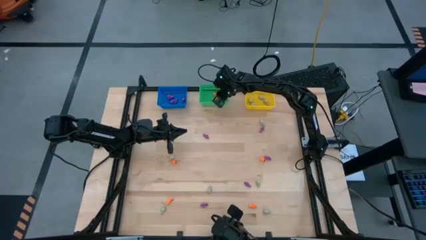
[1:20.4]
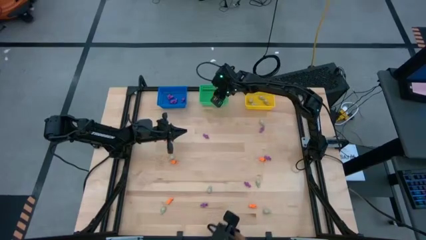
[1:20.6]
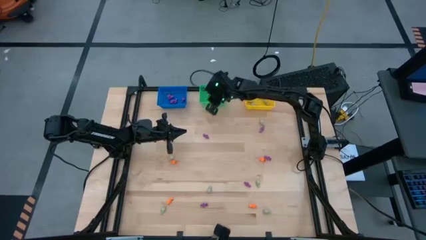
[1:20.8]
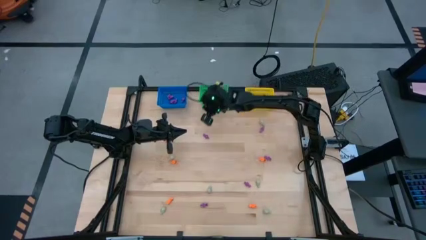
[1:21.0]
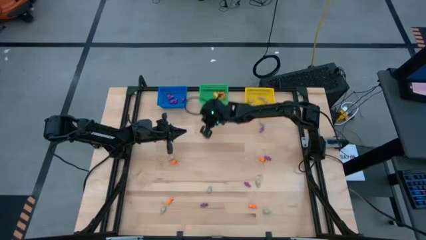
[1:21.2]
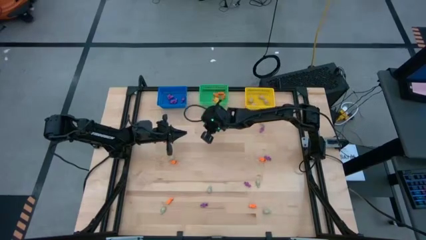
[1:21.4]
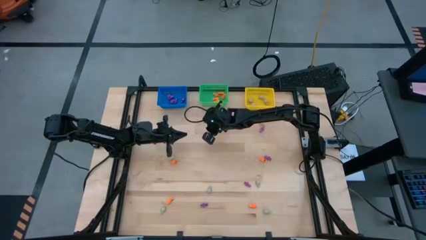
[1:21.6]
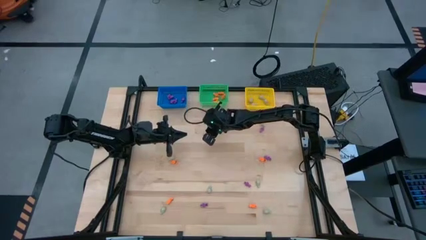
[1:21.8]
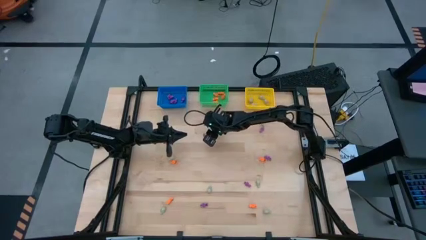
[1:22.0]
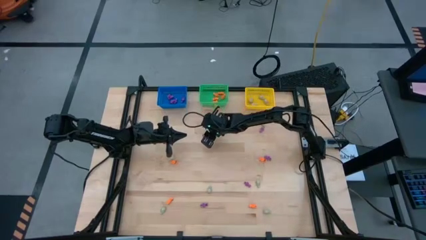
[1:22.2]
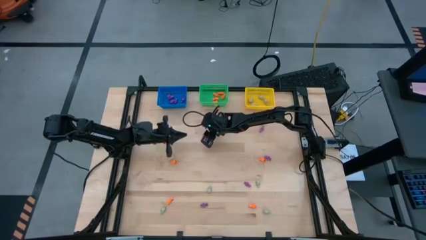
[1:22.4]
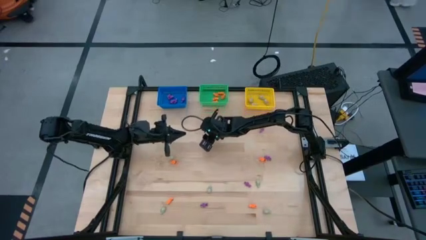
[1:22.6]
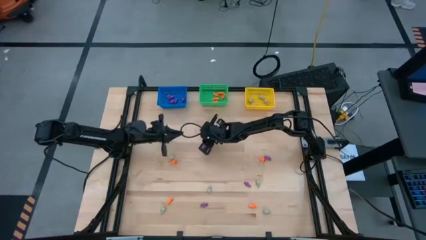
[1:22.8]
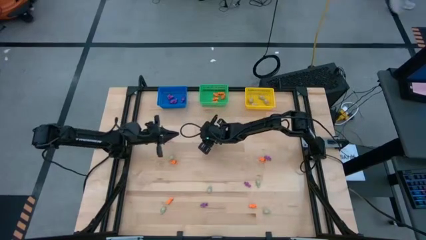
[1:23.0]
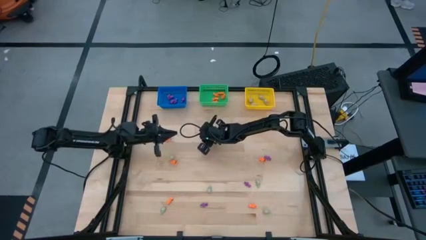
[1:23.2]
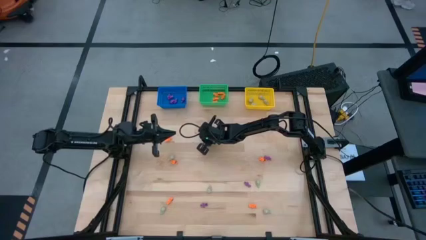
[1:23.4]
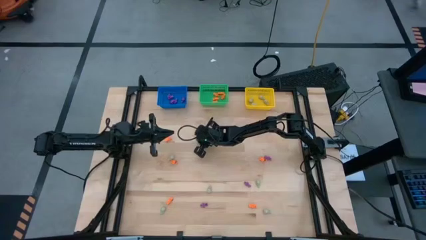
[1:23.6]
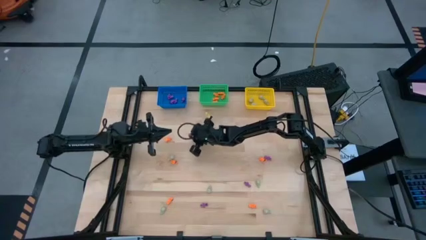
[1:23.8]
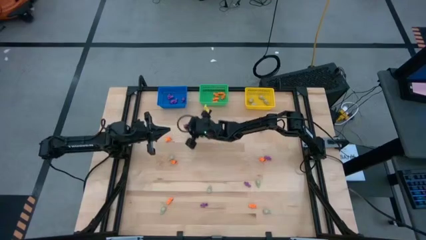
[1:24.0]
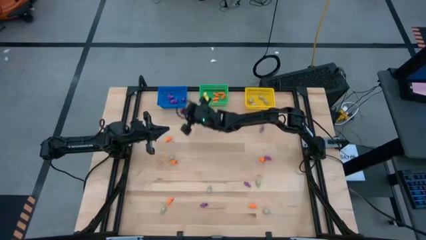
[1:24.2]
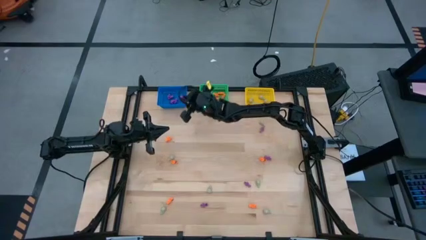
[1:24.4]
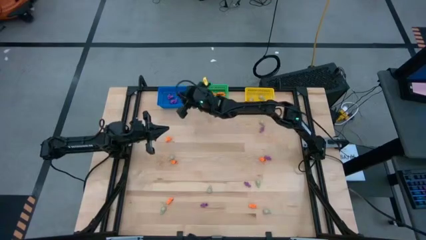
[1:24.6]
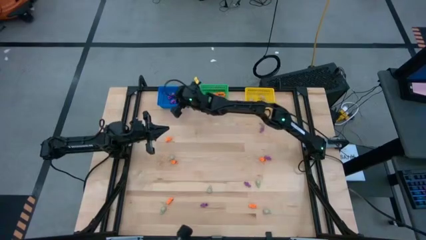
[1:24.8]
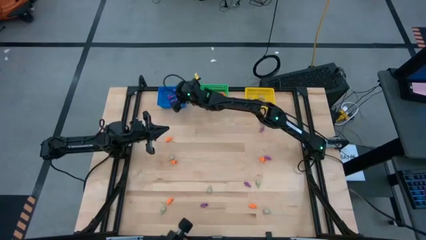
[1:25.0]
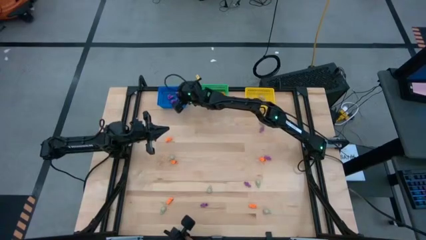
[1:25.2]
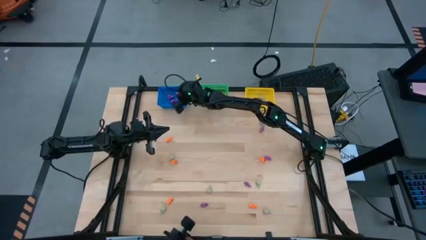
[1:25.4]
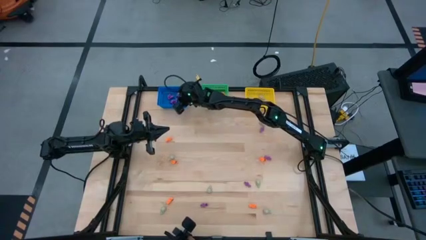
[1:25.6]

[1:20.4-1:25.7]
Task: Sort Halloween decoration
Put the purple skeleton toy into the blue basket

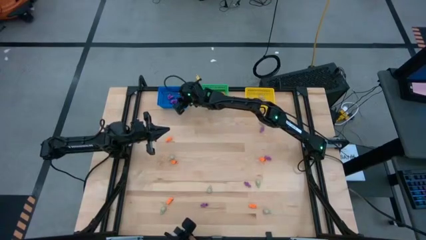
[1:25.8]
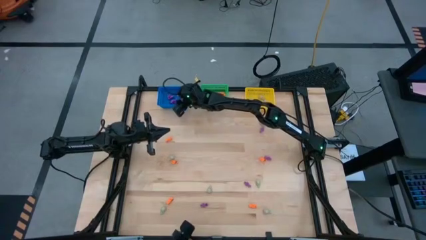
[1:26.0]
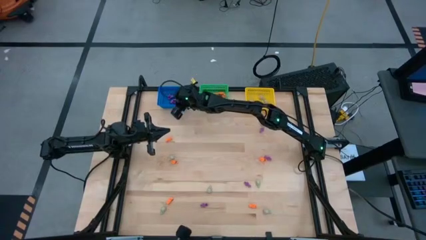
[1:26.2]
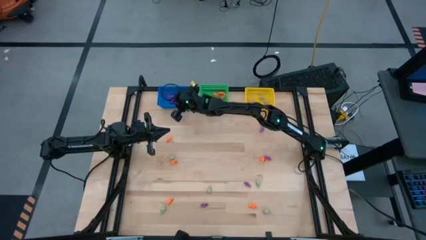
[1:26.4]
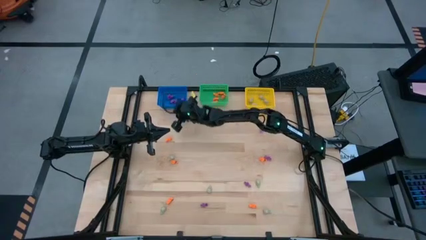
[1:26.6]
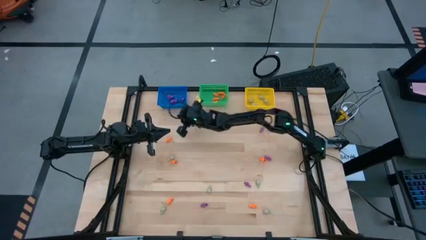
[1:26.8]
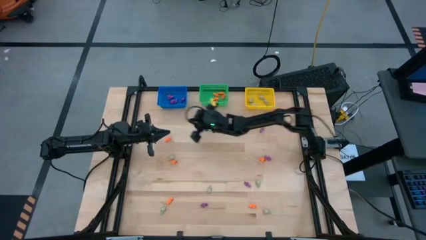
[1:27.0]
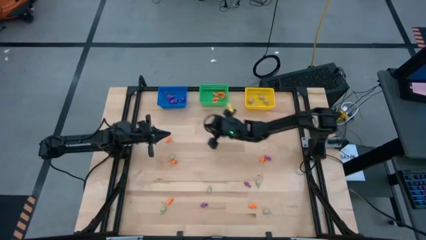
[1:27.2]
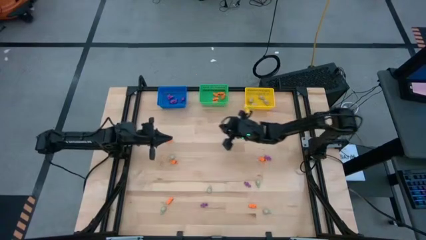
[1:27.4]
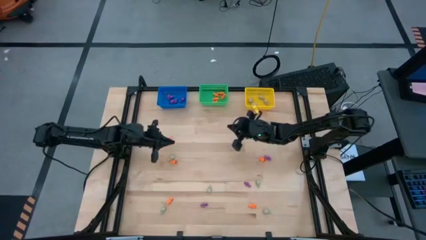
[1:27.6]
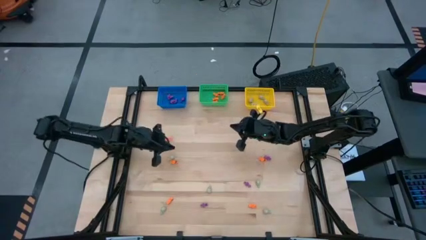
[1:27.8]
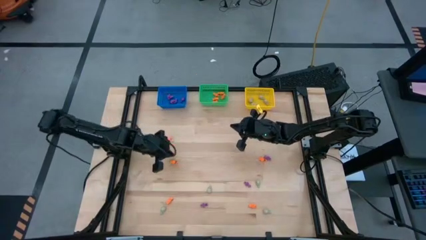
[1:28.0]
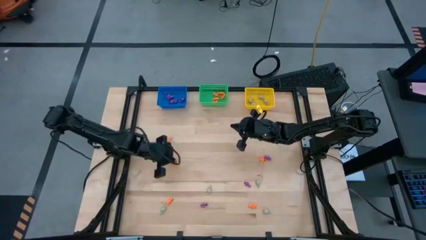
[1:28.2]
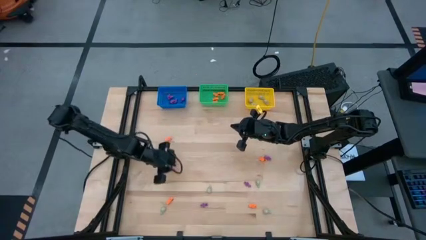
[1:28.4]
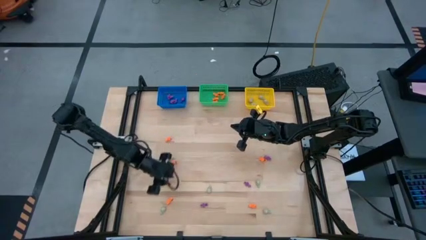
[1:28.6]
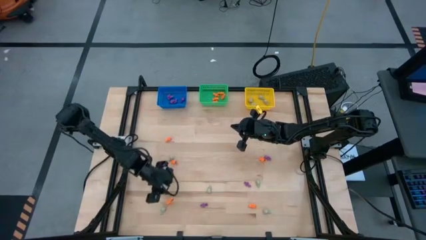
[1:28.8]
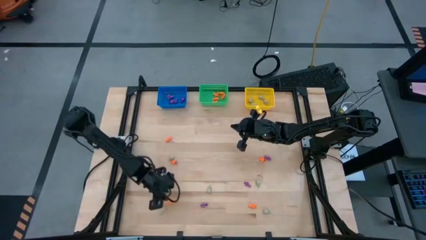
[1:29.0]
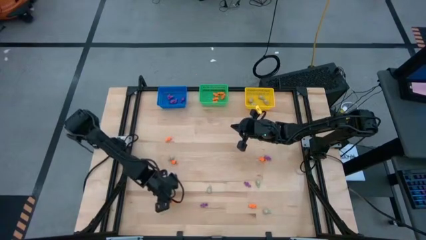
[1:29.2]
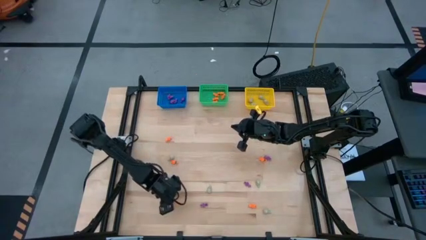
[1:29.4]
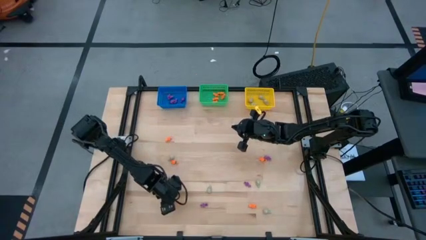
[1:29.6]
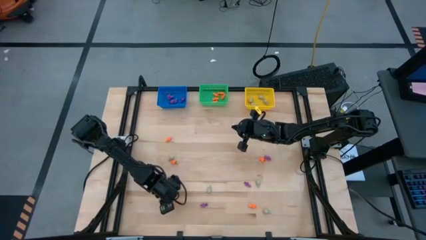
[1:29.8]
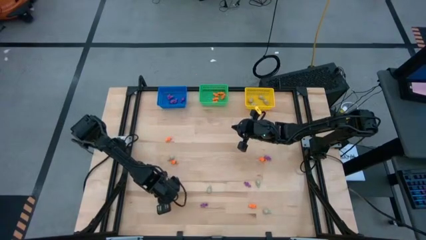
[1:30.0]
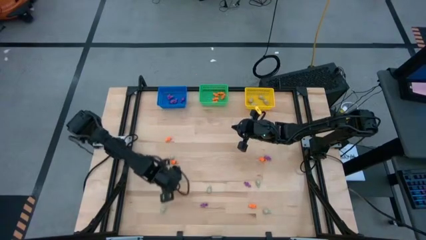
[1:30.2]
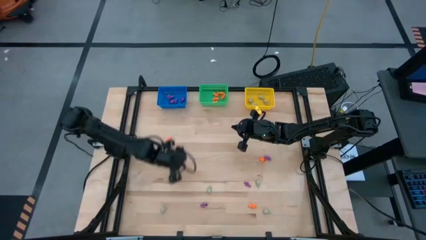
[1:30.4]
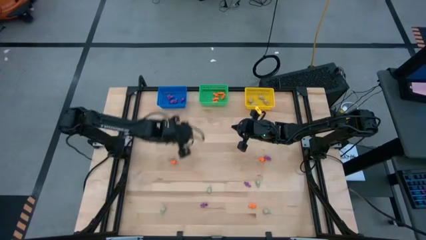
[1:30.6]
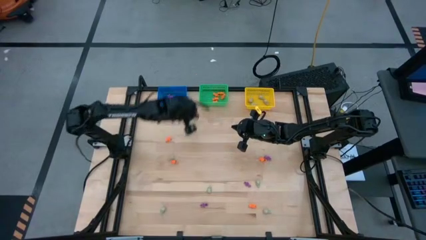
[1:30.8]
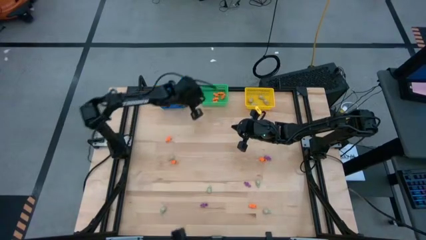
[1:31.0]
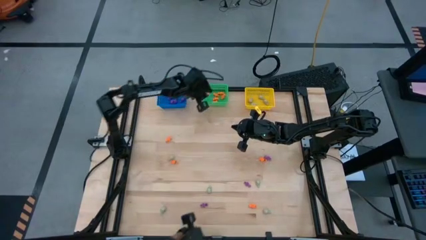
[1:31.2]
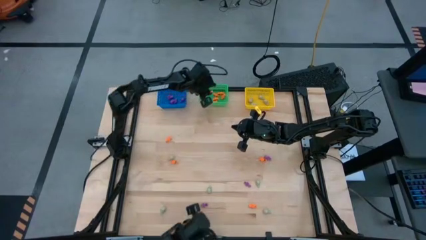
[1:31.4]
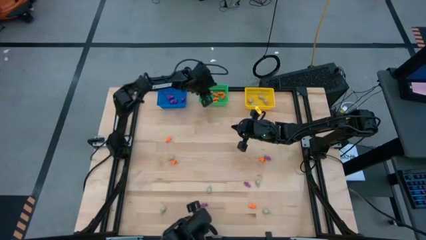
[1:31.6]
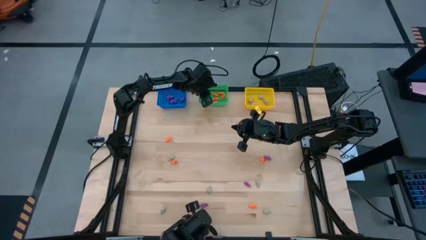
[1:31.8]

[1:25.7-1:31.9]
Put the orange skeleton toy into the green basket

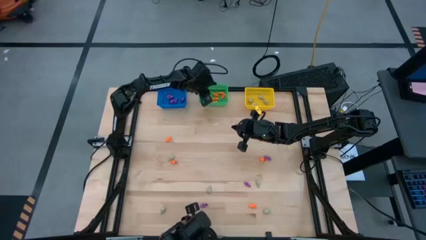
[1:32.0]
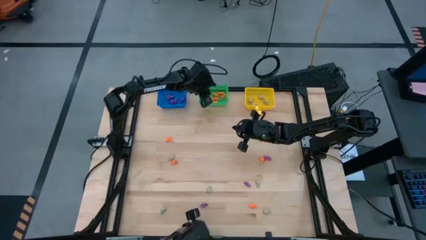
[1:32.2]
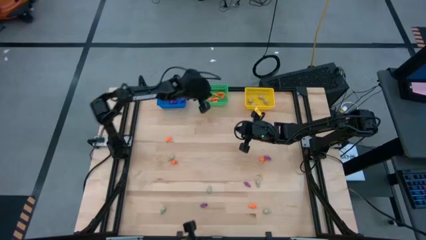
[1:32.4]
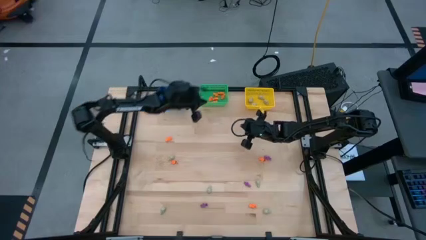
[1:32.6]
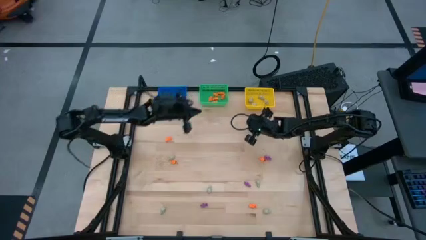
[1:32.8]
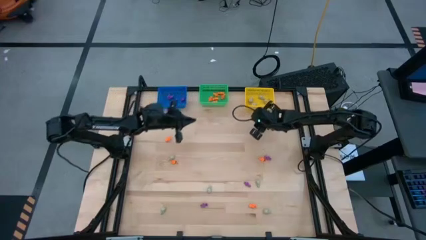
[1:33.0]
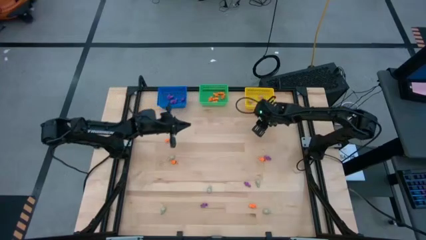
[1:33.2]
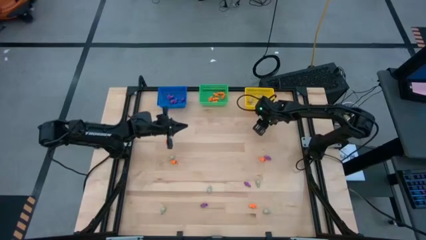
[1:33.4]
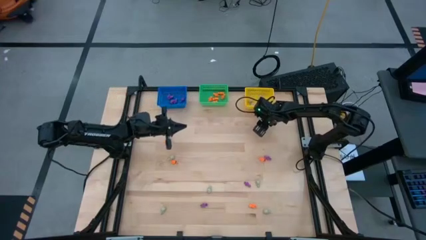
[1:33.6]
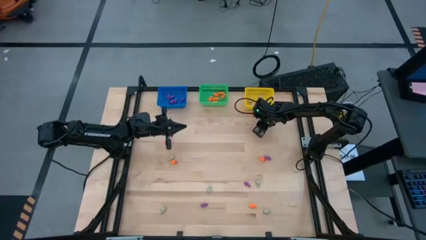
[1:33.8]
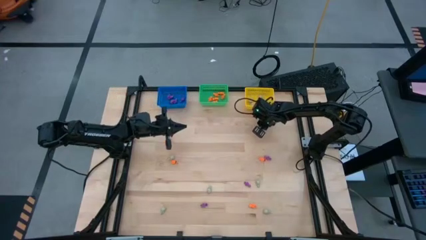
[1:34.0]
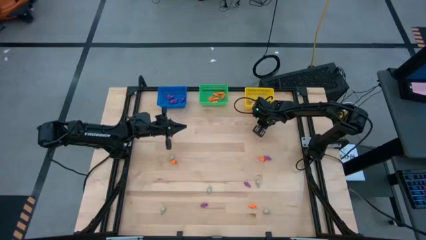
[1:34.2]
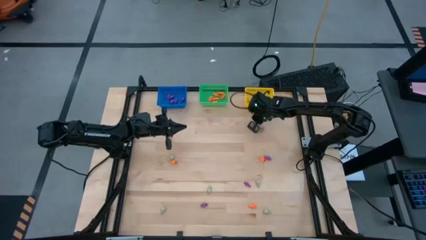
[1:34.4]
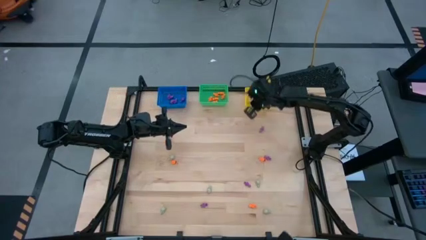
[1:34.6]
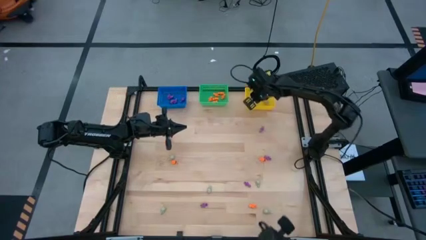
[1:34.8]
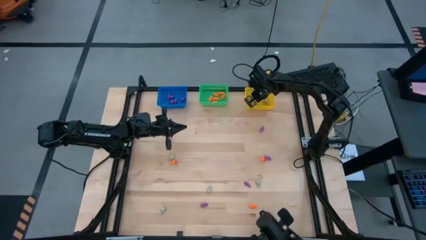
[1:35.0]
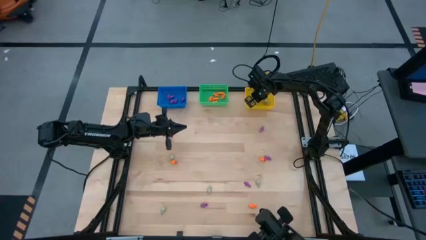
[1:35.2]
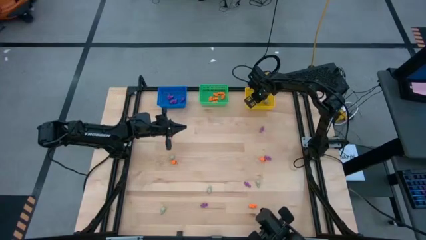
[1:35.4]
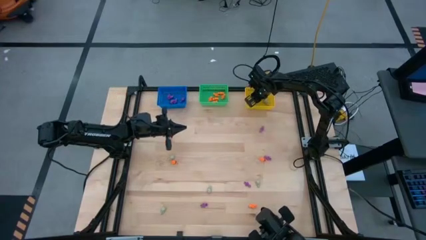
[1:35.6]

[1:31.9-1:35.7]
Put the grey skull toy into the yellow basket
